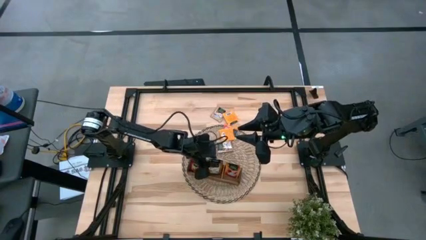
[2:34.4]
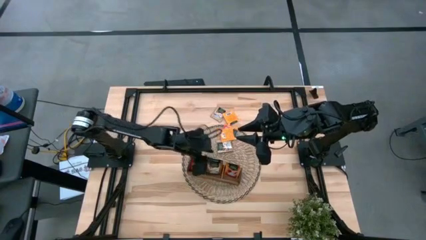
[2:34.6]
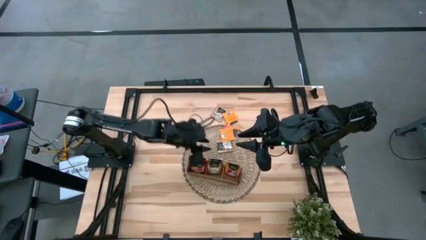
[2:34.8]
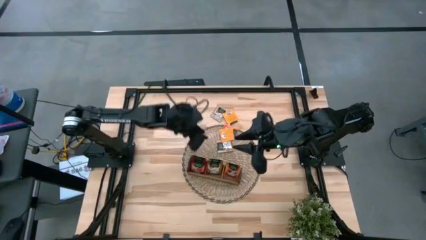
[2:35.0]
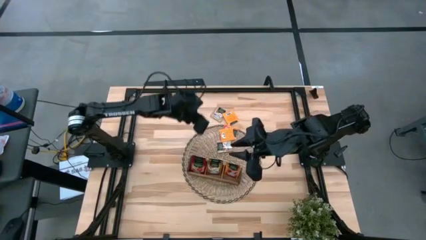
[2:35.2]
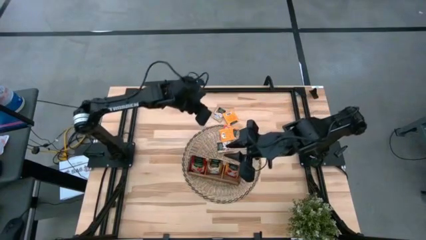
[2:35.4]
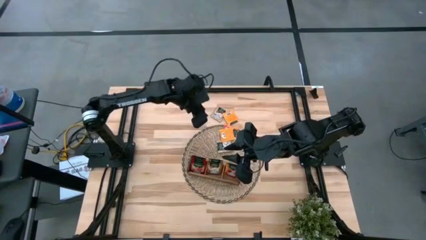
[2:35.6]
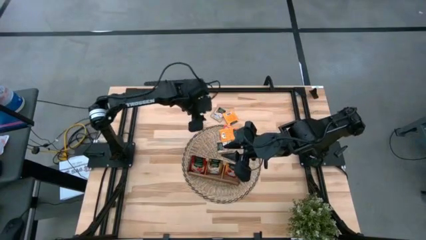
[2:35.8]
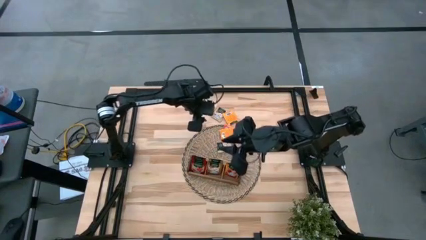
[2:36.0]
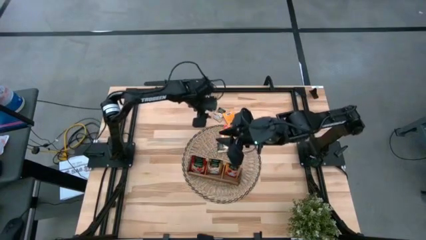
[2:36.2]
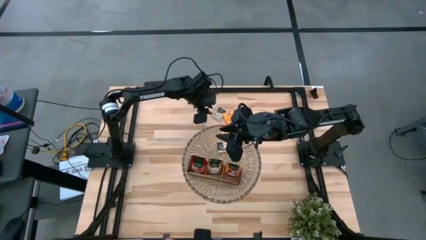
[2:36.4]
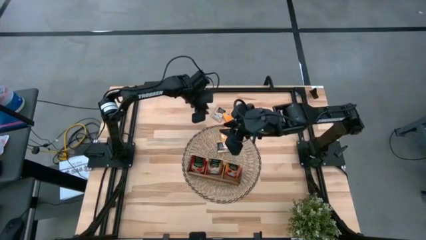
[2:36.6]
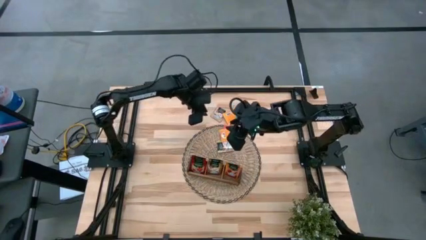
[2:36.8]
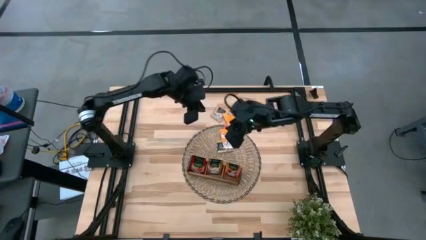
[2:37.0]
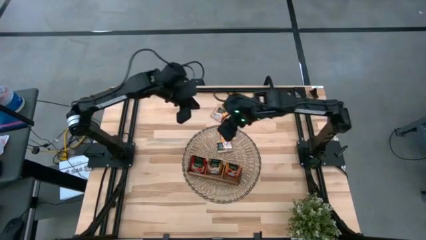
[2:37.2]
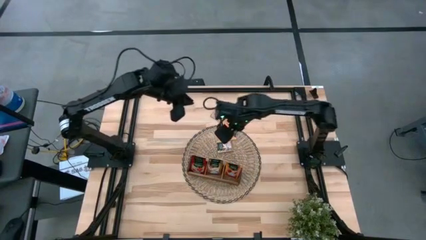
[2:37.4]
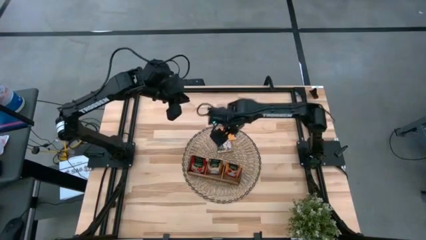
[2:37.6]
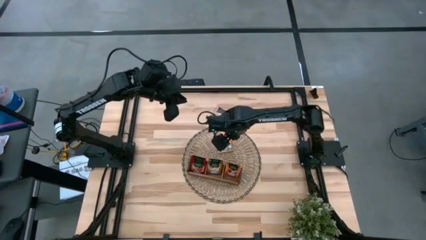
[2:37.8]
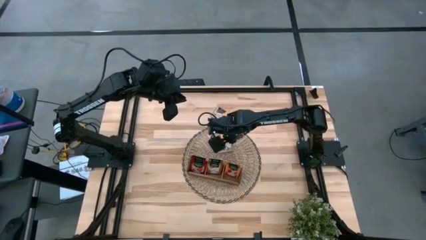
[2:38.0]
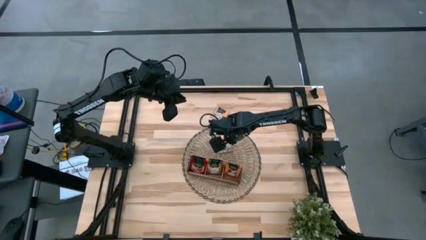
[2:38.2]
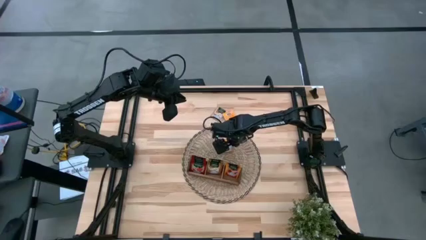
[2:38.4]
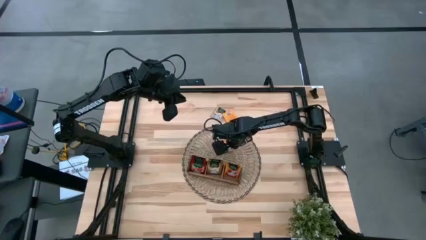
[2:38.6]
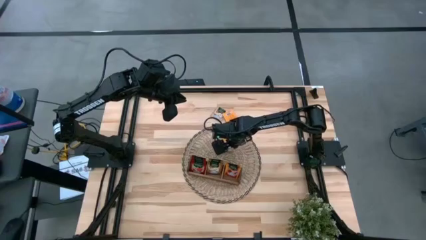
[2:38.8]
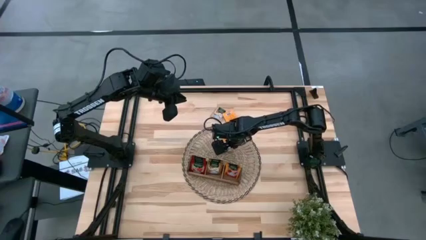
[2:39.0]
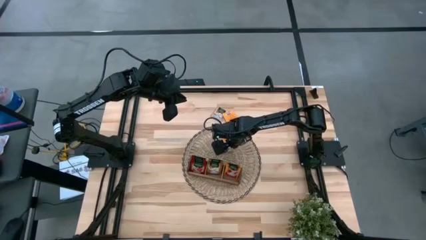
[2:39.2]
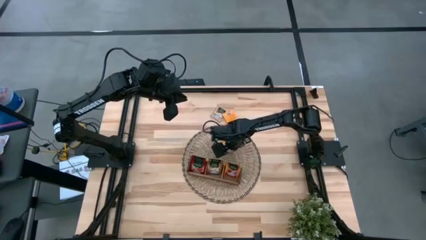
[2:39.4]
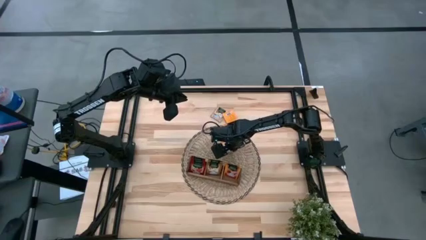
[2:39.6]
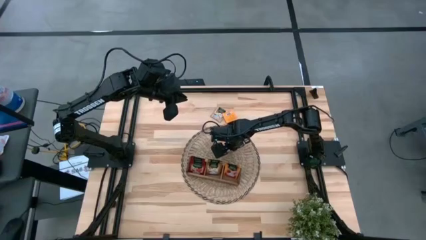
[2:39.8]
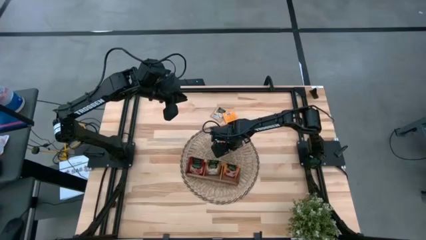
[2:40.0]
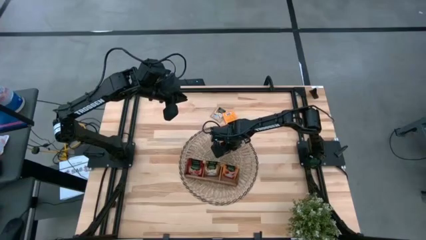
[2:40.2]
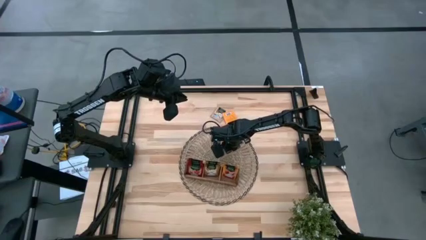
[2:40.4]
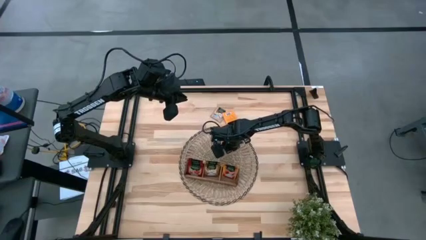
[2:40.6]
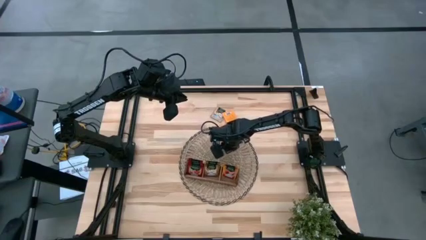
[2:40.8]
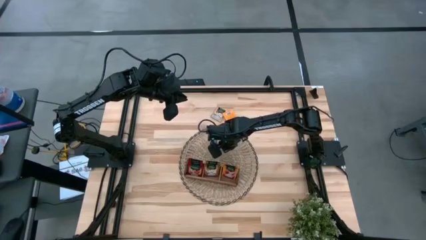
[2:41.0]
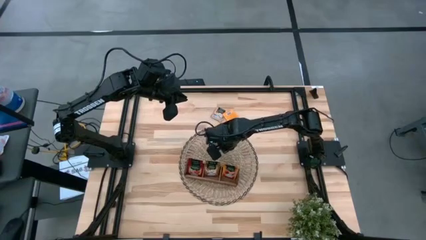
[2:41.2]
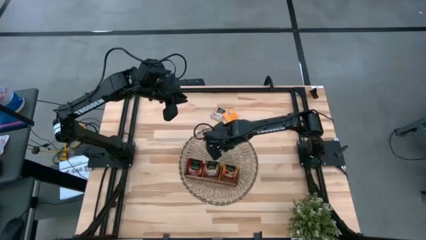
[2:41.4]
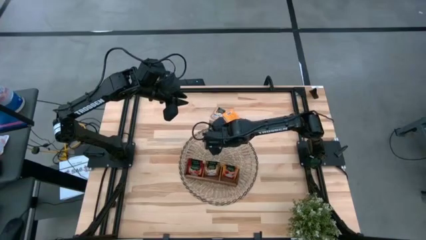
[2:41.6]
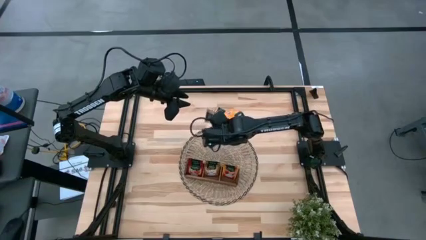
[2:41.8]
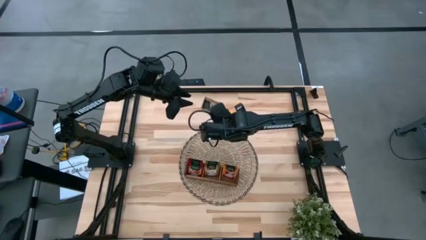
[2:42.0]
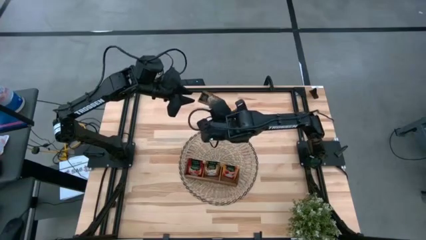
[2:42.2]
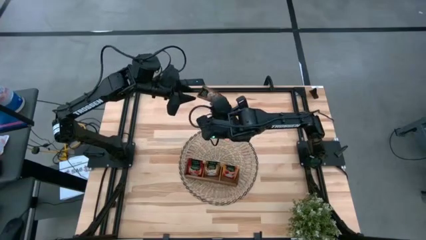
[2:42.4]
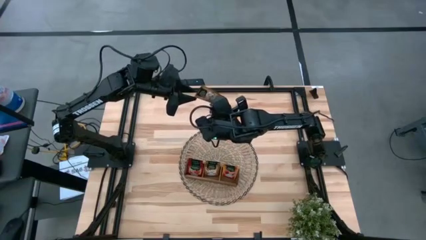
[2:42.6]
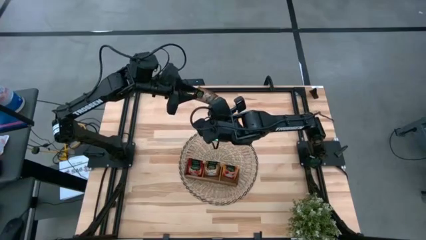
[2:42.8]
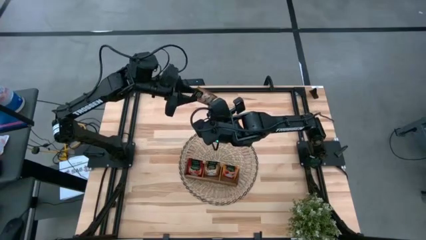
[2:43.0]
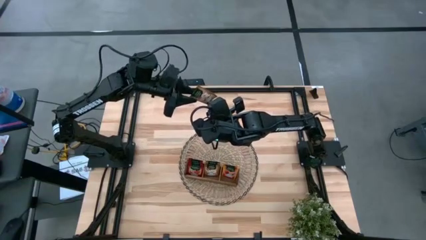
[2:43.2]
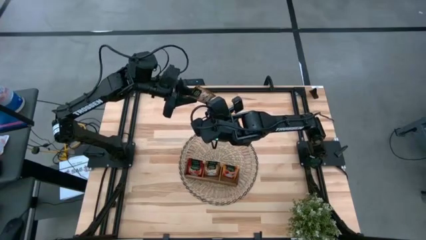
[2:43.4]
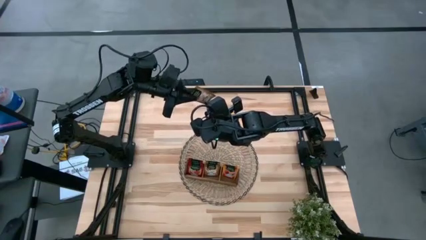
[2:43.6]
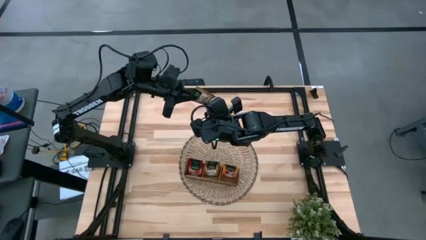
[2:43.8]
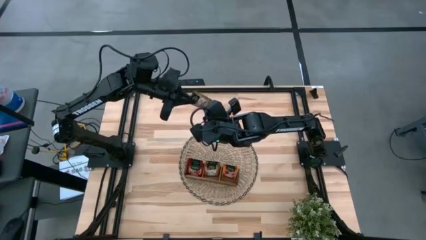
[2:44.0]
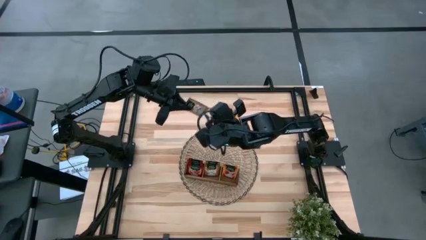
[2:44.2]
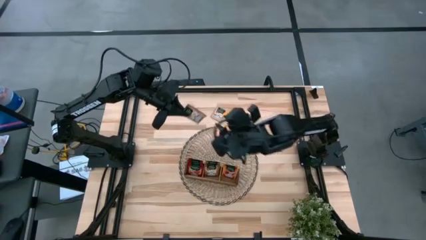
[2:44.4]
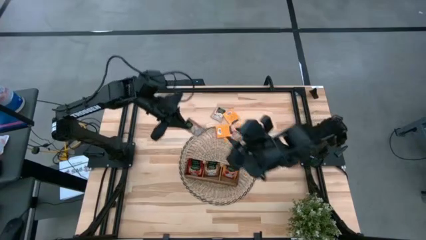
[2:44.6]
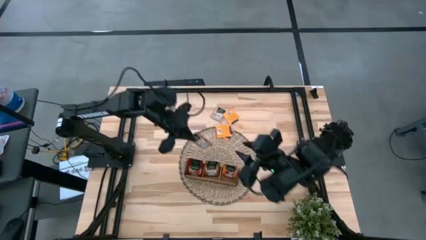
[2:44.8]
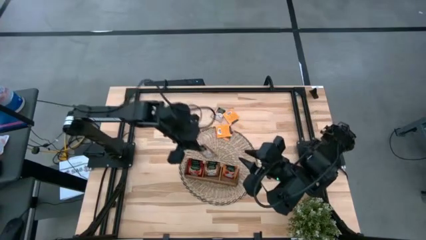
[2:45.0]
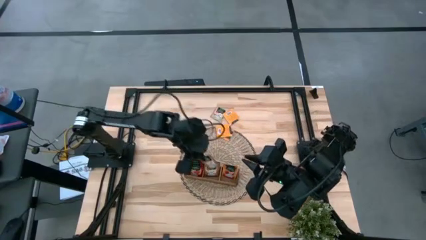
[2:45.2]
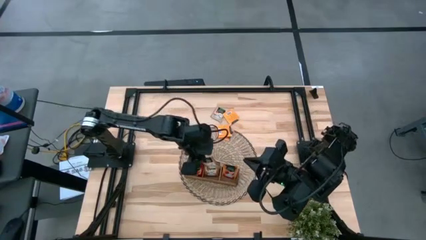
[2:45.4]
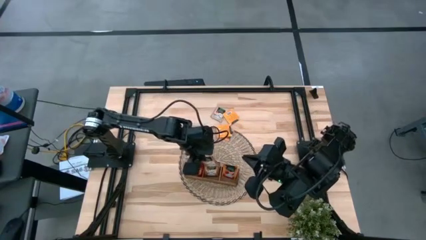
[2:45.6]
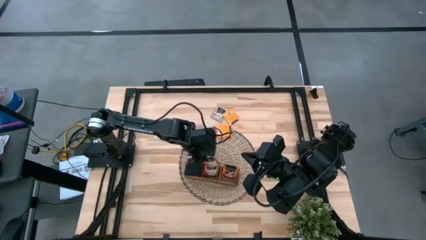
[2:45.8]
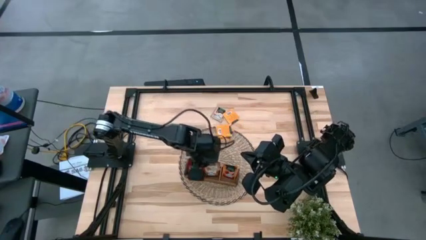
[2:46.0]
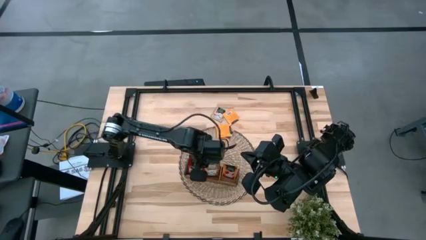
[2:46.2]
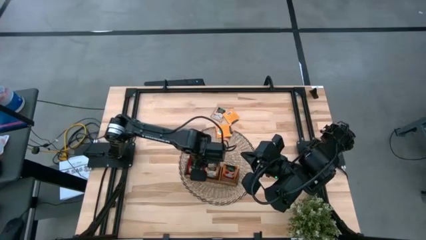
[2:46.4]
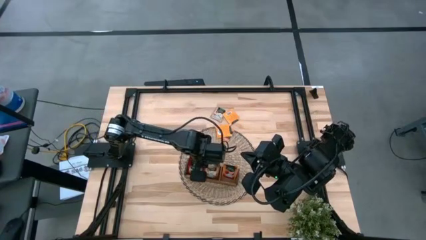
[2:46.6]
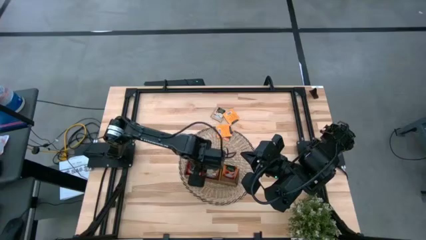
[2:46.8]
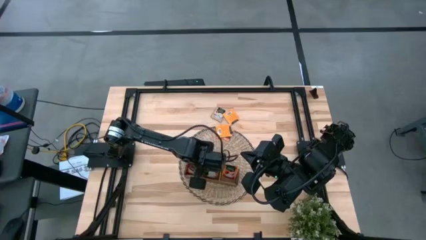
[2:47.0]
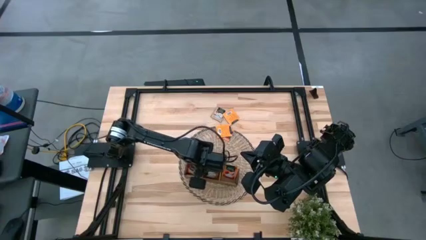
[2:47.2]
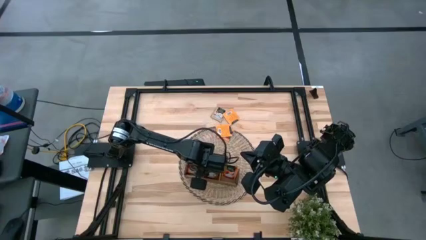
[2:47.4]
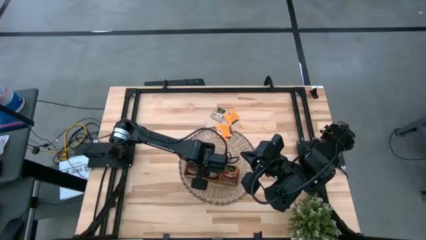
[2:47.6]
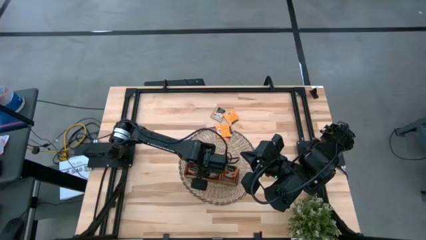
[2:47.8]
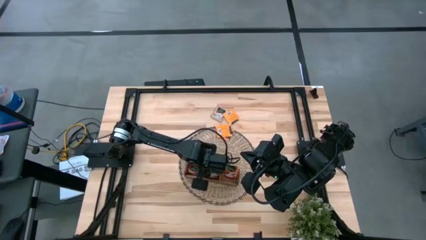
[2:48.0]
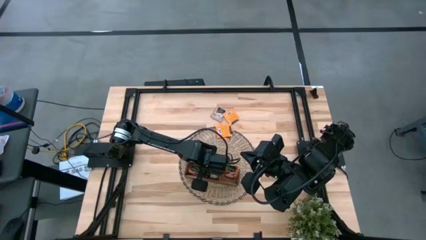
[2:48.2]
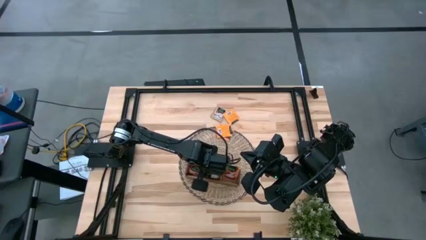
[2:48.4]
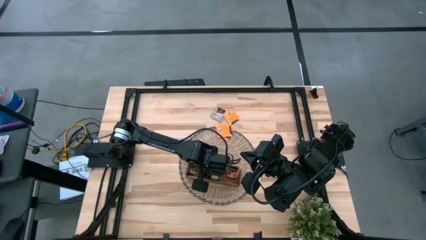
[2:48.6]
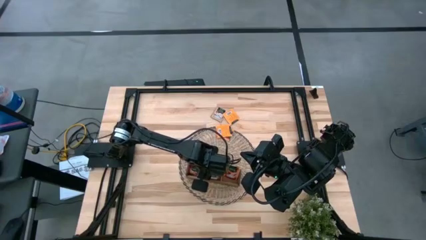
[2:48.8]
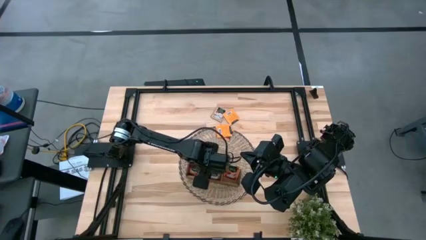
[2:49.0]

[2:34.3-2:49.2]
Task: Pick & Place Tea
Put the brown tea bag into the middle section of the wooden organizer

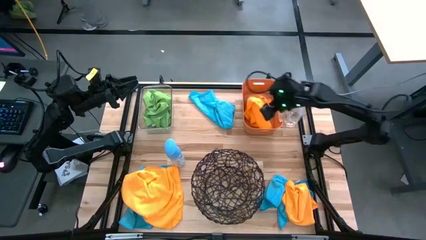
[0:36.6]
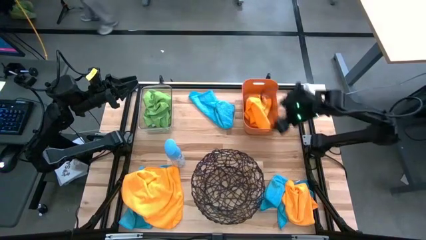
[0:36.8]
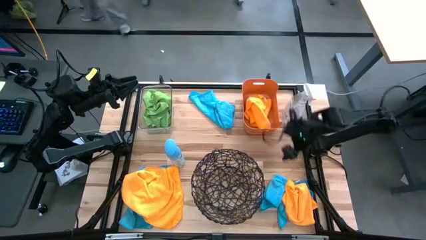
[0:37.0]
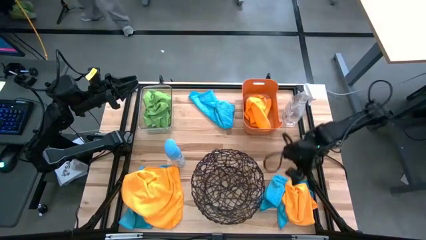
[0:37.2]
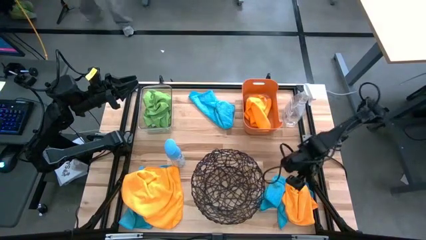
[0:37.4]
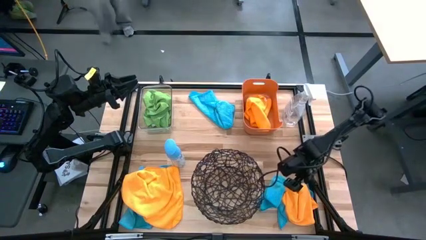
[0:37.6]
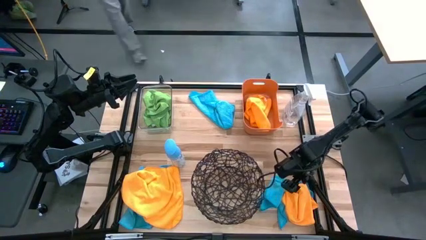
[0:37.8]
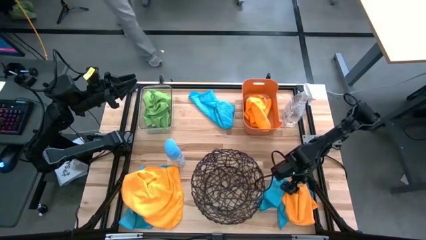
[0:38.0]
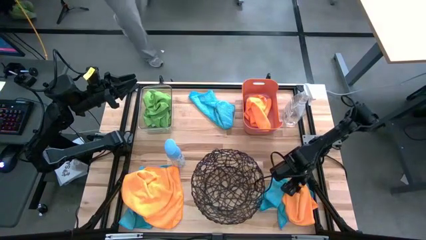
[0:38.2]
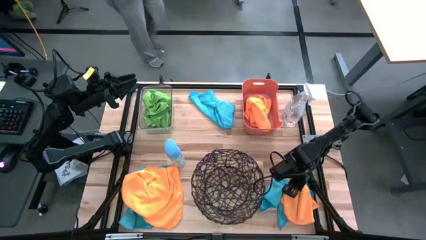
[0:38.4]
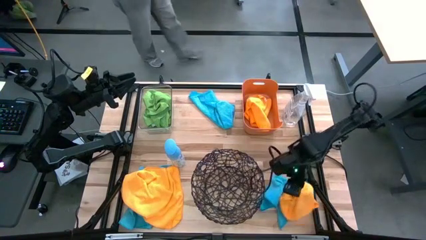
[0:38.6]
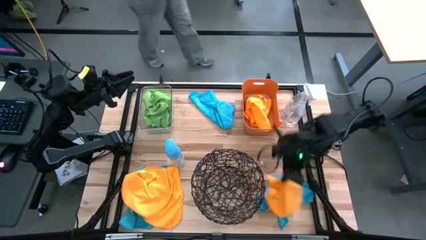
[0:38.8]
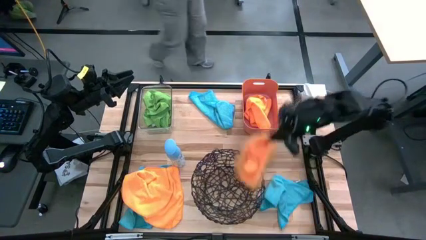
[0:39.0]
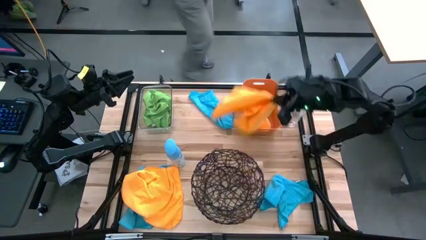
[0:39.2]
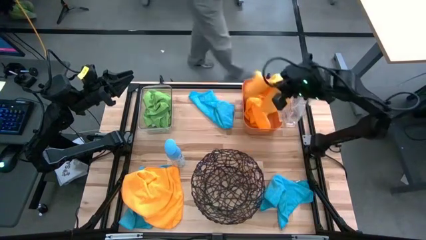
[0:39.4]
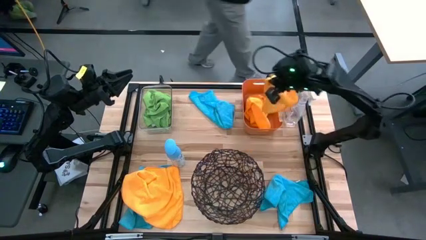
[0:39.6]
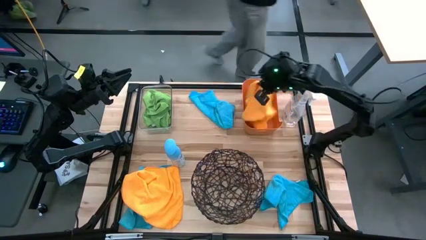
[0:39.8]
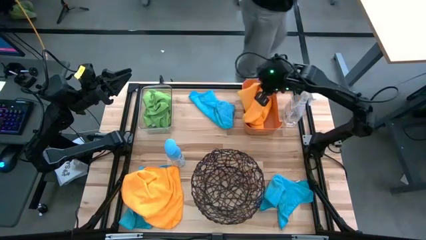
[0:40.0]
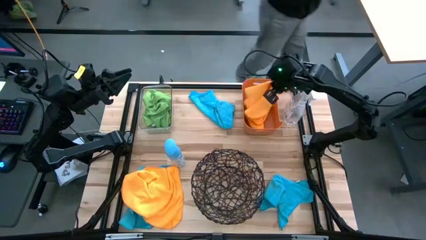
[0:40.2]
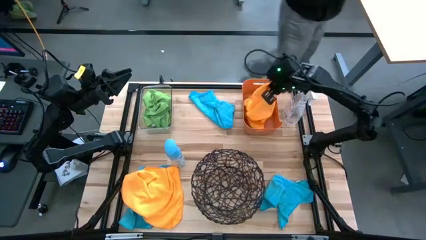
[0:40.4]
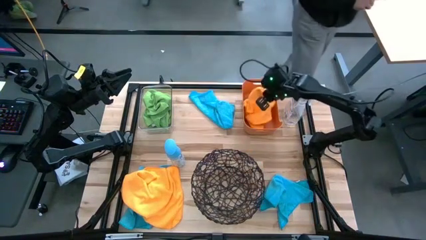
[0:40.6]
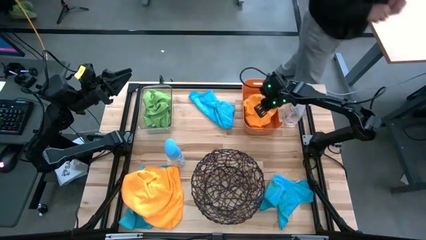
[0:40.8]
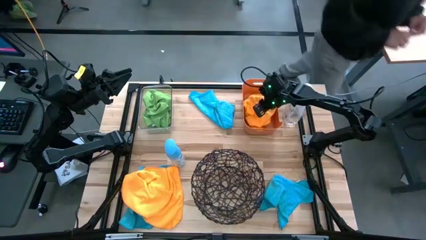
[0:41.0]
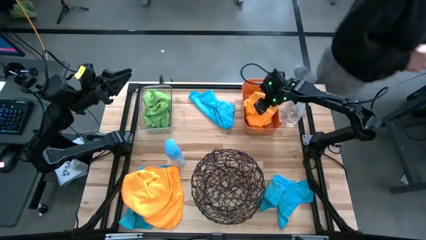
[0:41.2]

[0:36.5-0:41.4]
Task: Sort microfiber towel by color & place in baskets
Put the right orange microfiber cloth into the orange bin
